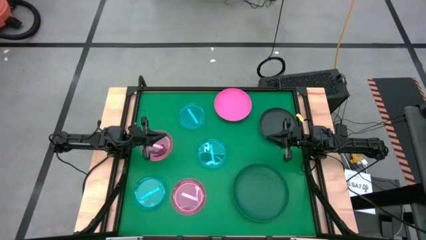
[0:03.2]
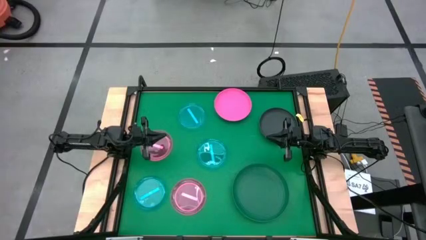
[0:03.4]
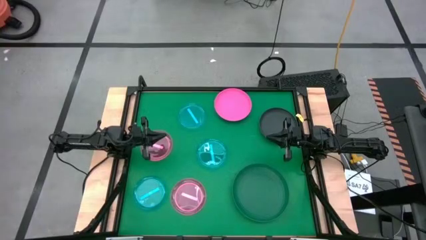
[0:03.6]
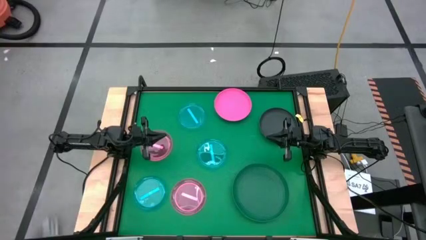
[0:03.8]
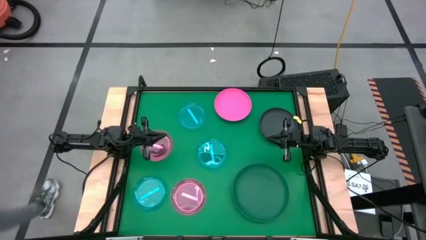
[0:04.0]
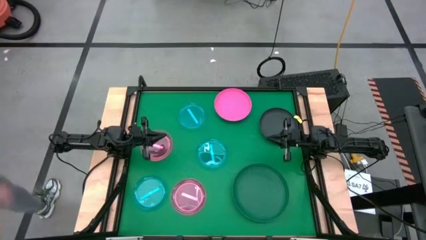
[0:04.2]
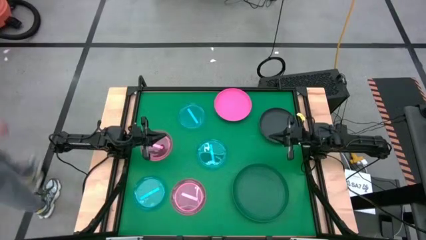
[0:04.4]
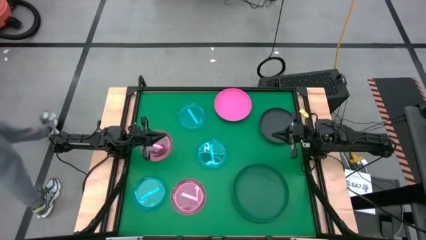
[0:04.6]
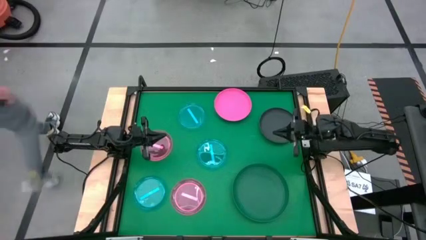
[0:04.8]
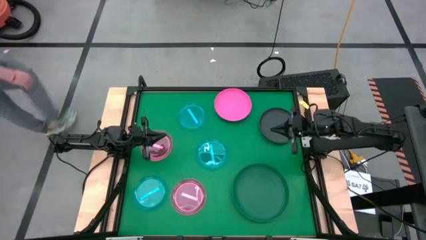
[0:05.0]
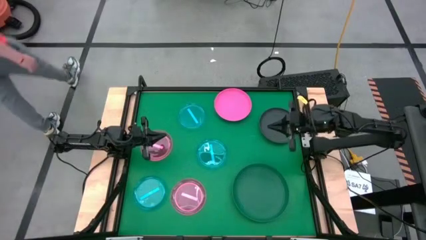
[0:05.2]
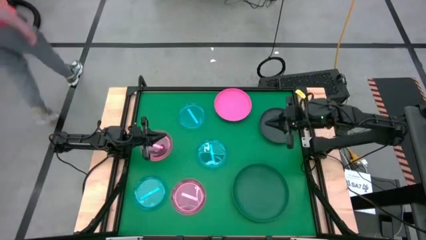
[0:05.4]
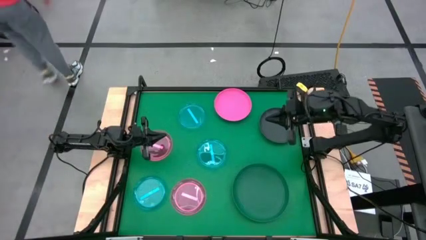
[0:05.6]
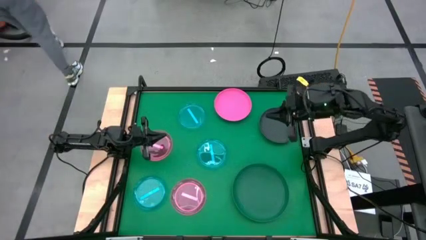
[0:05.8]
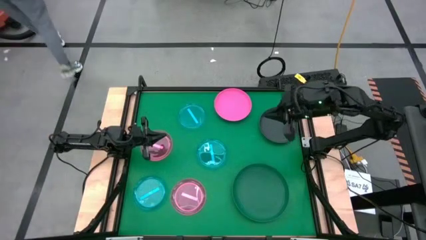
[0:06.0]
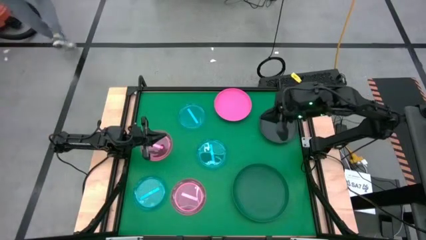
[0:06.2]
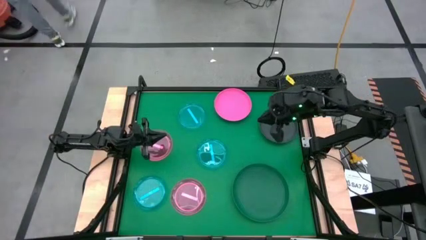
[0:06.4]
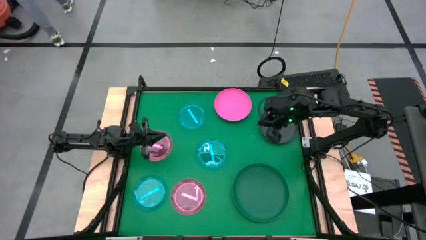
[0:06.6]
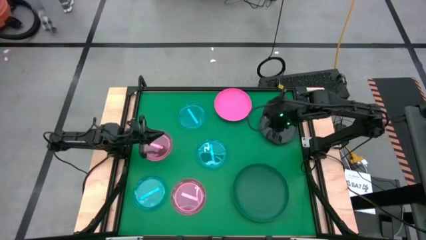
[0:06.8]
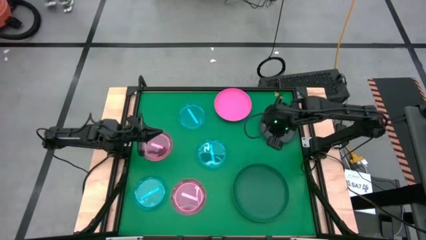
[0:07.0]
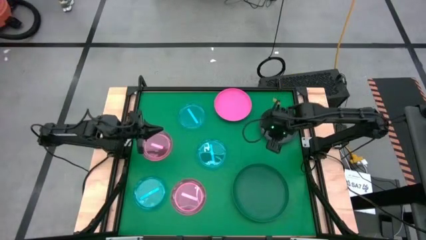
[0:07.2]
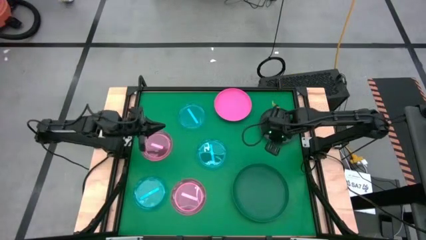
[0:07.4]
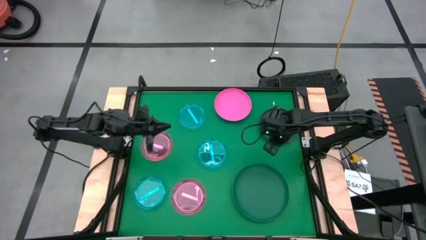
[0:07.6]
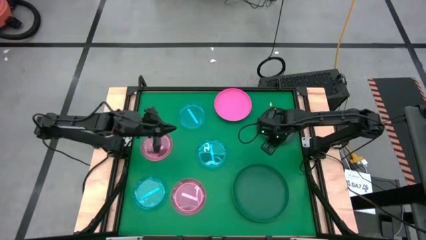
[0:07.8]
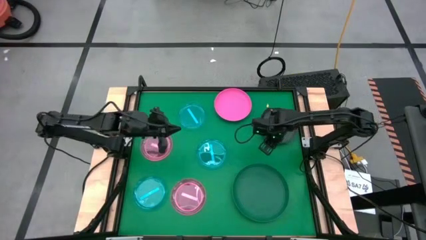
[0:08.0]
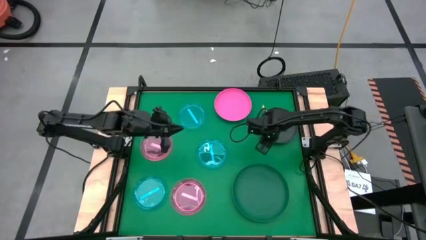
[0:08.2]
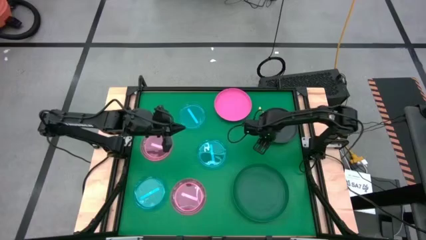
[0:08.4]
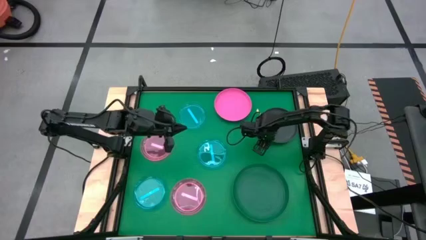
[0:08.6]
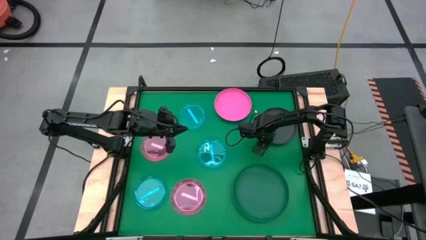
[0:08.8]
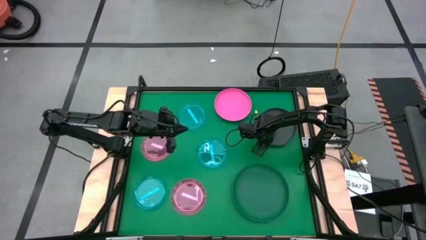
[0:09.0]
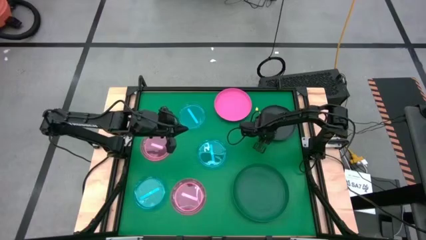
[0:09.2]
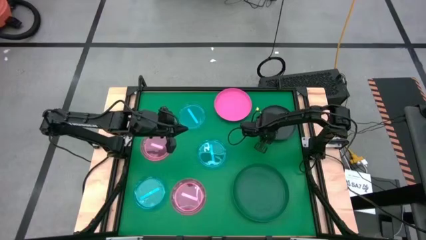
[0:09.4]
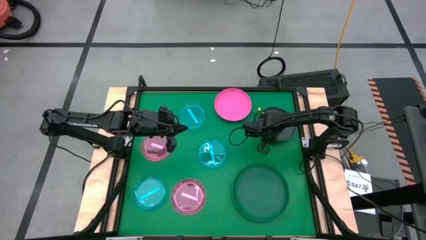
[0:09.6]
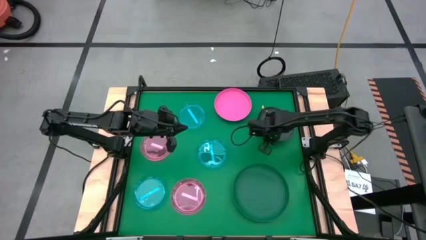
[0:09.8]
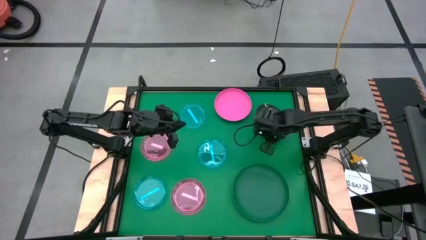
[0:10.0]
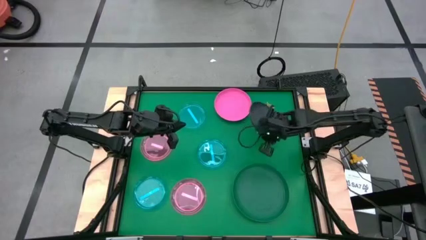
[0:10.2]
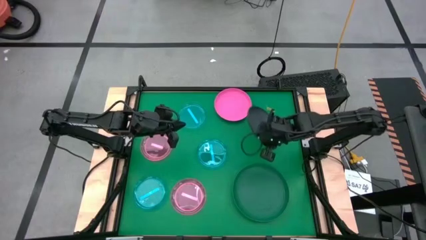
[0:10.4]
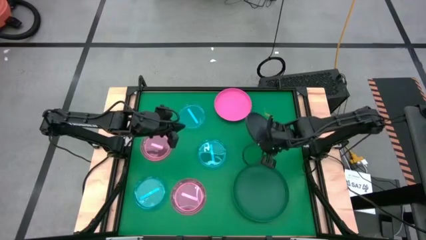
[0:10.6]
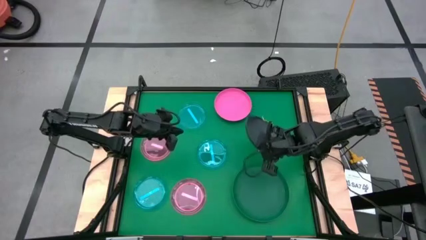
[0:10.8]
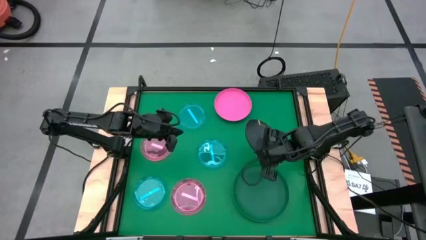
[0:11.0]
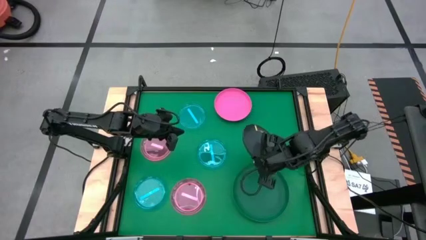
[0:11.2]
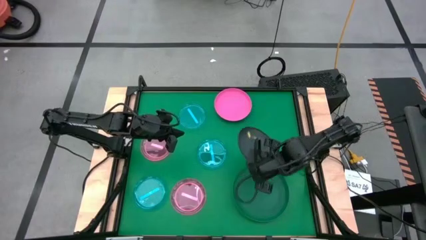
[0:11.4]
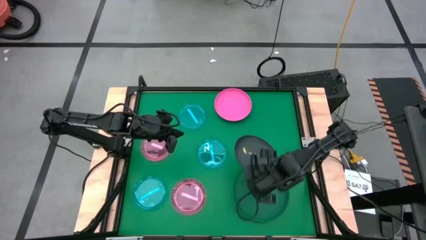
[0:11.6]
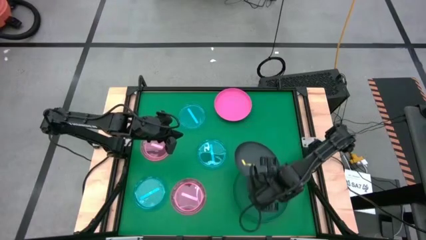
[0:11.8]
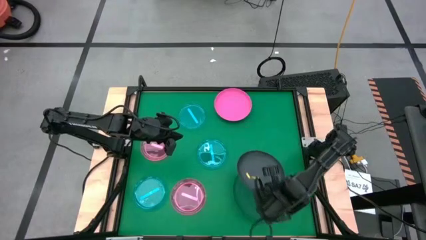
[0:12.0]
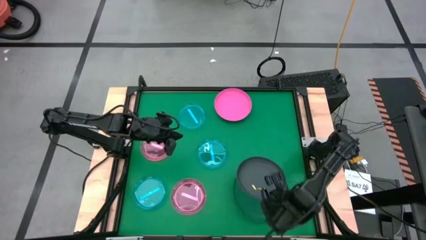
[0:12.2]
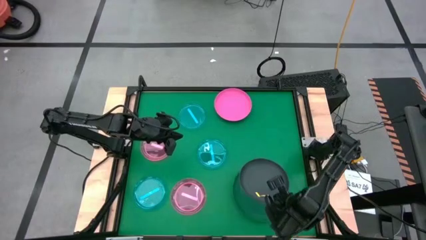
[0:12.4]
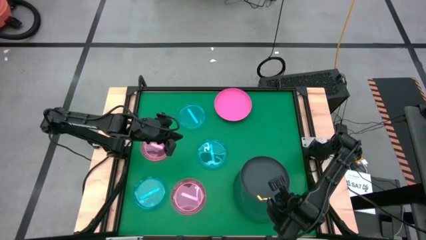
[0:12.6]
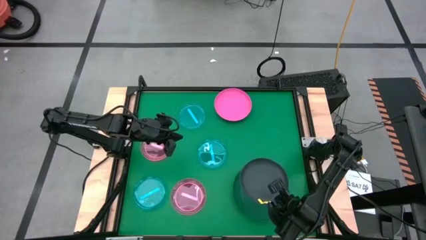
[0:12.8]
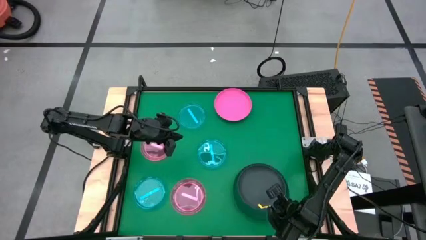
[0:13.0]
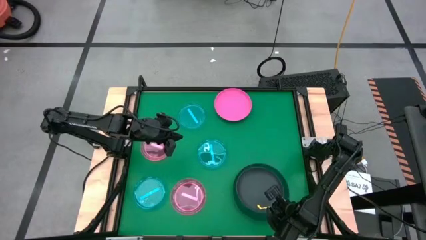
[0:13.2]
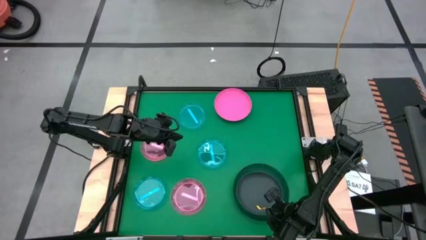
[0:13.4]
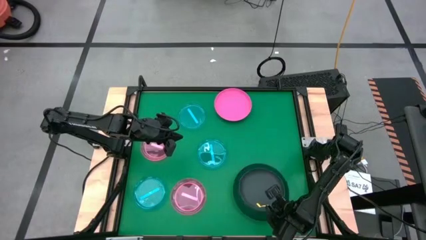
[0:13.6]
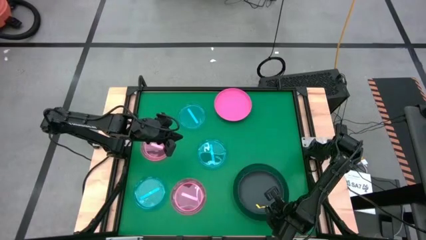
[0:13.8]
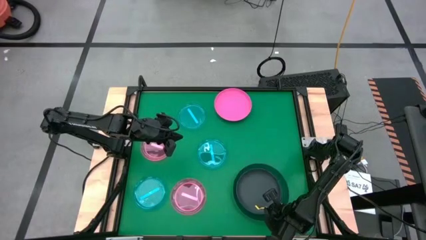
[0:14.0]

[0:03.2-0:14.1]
Task: Stack plastic plates
Stack the black plate on top of green plate

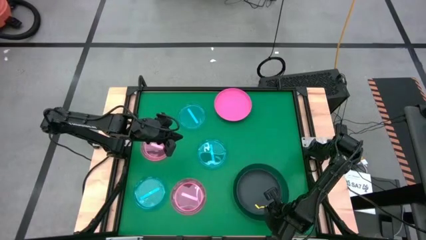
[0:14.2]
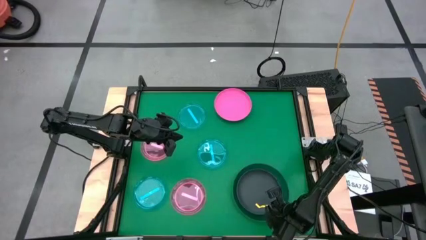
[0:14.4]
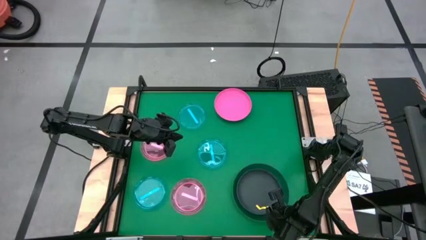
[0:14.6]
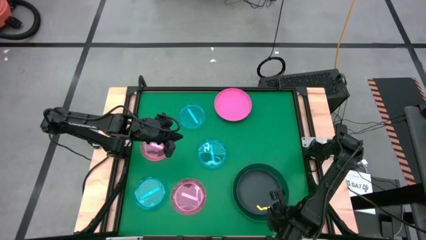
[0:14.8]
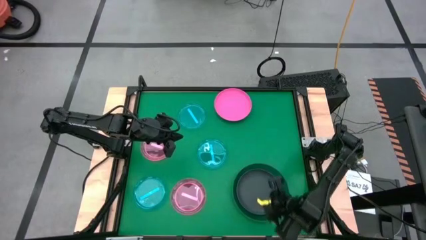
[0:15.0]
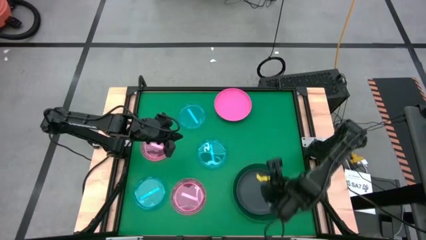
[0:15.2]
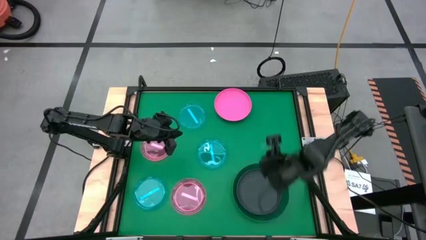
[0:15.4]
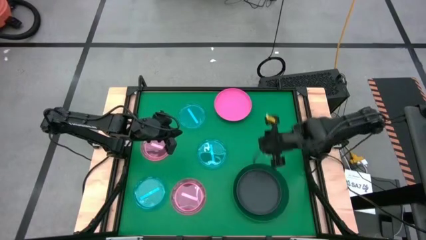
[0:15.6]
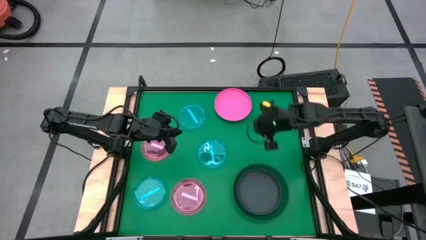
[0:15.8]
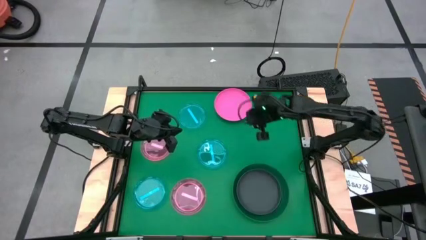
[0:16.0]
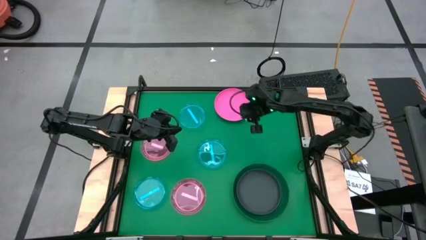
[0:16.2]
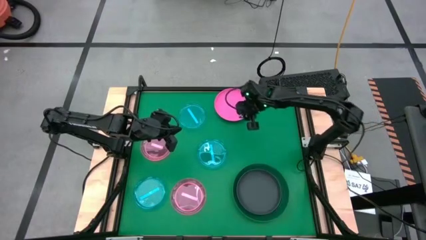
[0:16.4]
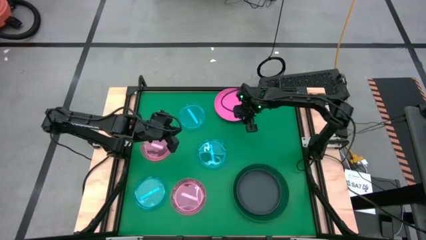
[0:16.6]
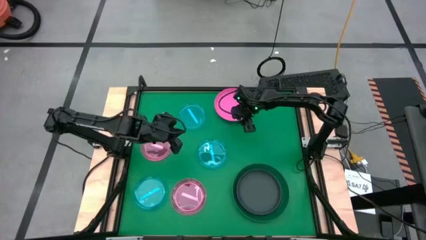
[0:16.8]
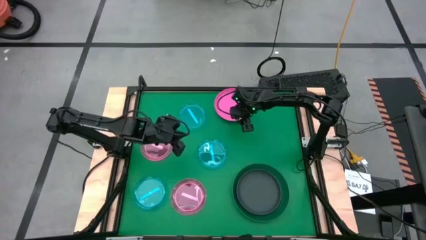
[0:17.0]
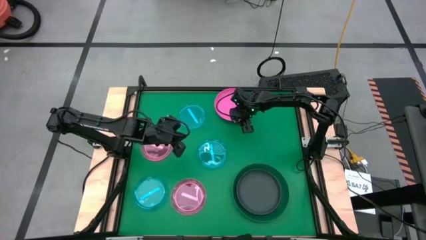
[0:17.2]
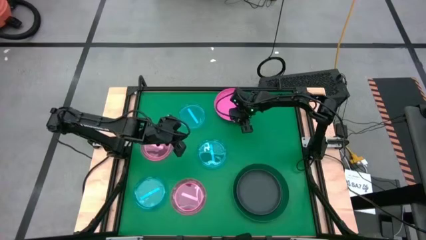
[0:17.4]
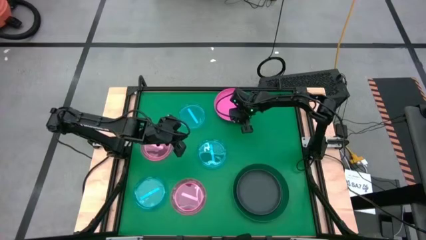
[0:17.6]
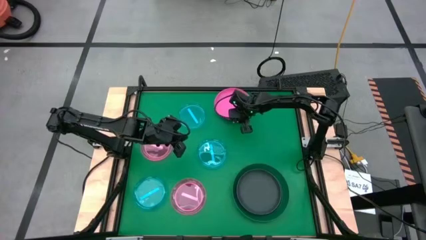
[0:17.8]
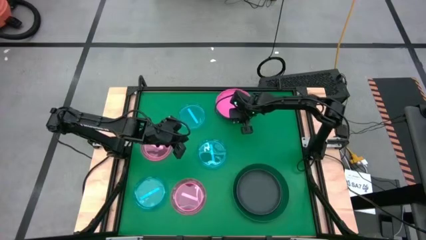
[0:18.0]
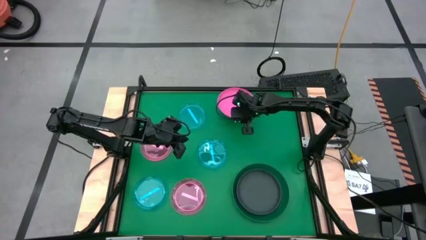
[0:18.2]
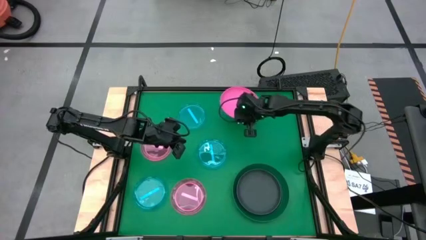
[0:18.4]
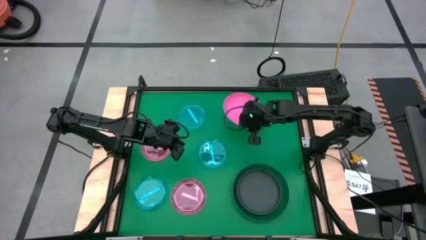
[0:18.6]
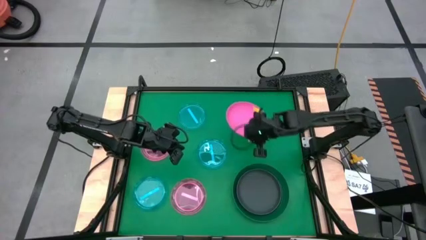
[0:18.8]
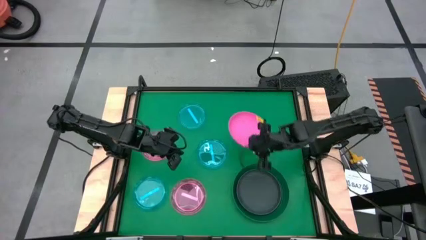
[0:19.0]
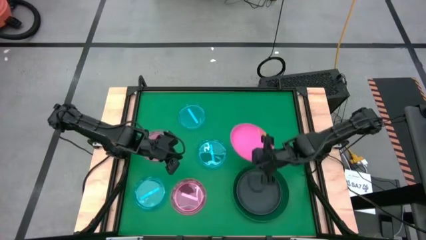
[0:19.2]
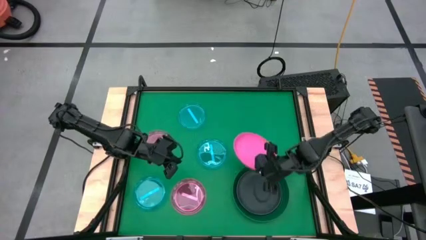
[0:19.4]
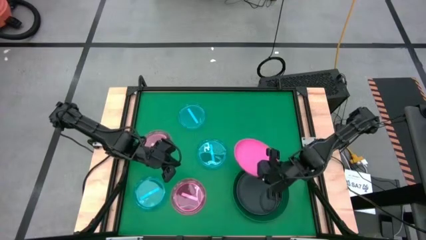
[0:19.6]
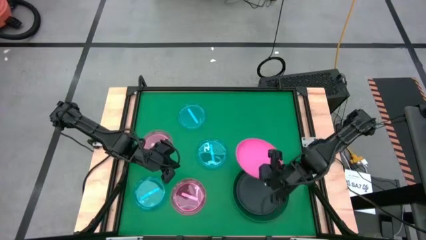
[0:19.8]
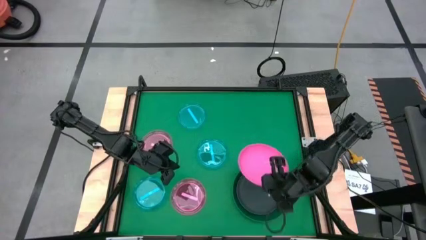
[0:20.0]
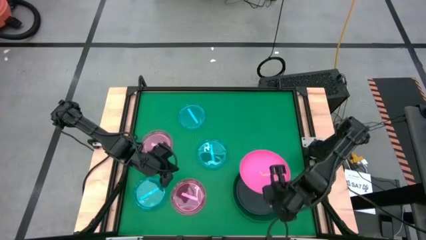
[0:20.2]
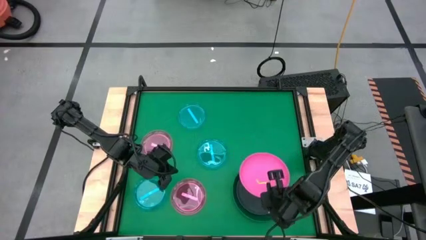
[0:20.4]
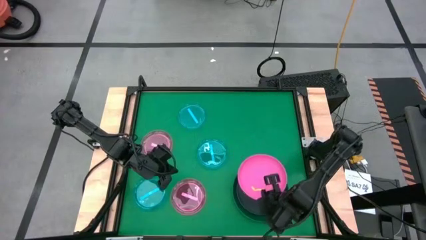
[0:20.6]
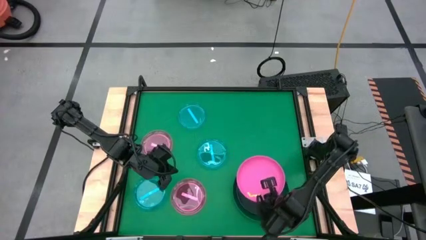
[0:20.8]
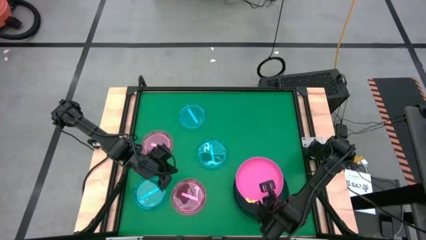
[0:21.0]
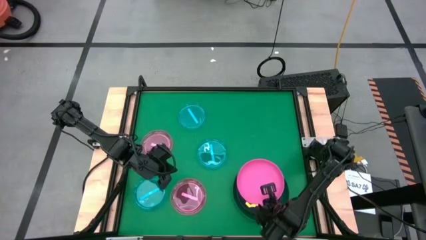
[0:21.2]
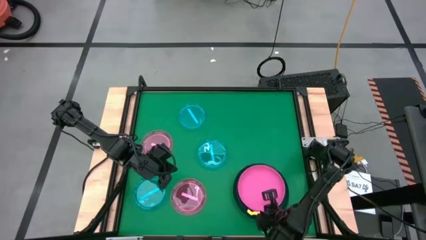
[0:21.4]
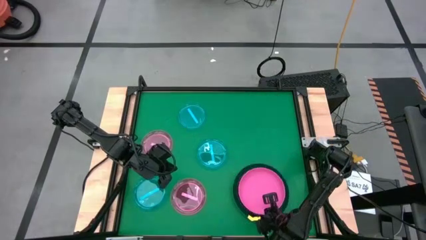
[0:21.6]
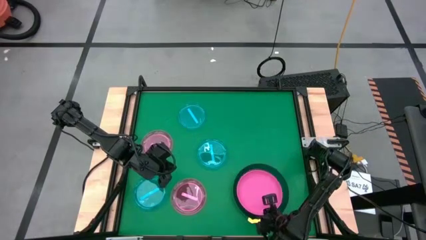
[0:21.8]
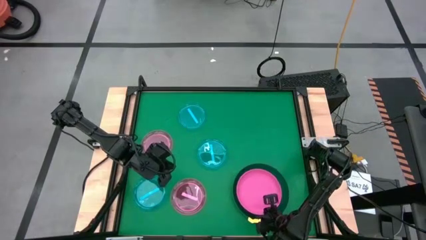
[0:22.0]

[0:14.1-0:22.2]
Stack the pink plate on top of black plate
